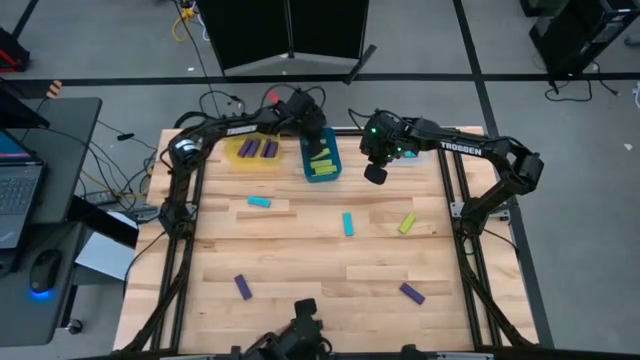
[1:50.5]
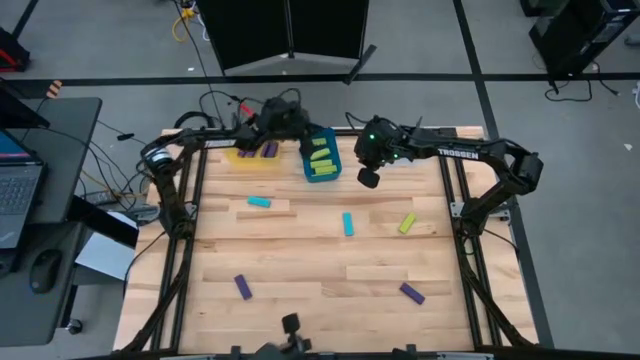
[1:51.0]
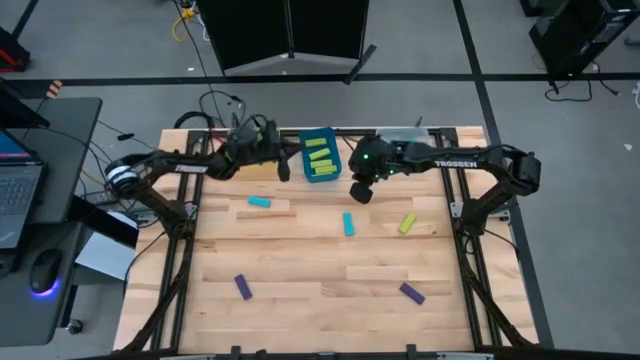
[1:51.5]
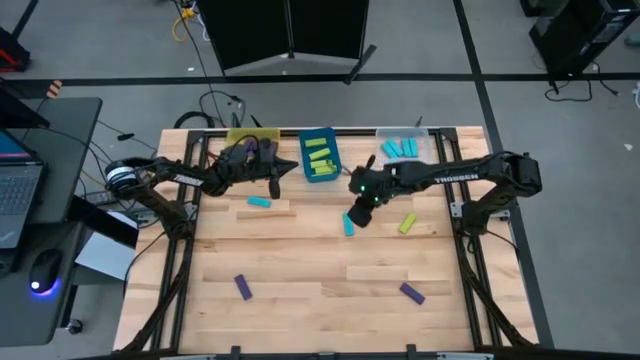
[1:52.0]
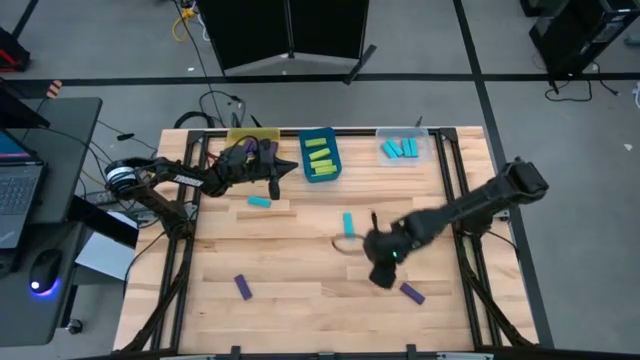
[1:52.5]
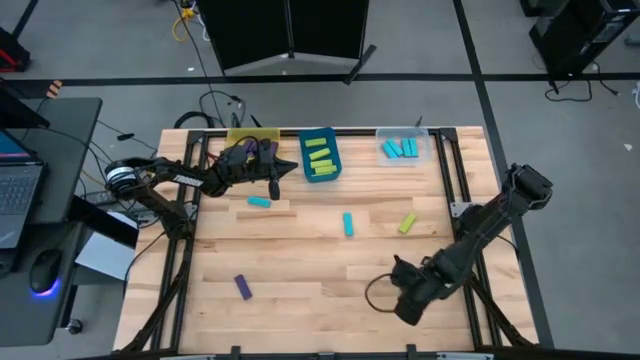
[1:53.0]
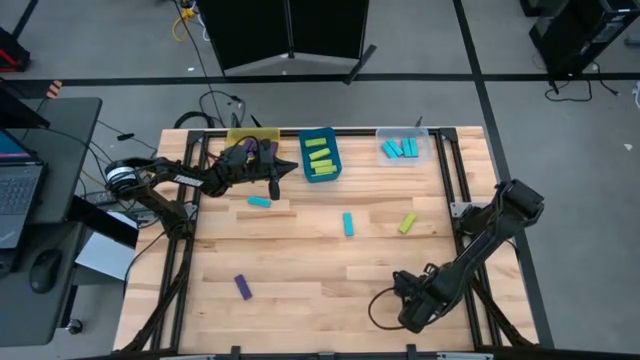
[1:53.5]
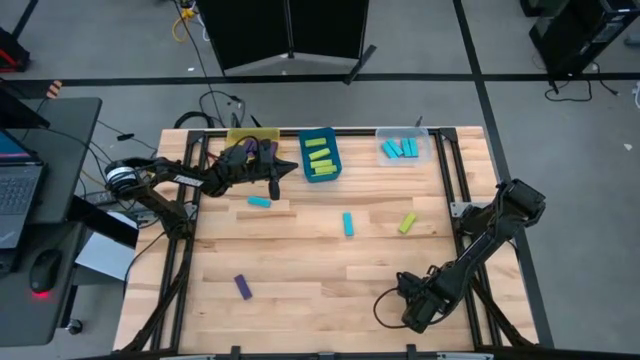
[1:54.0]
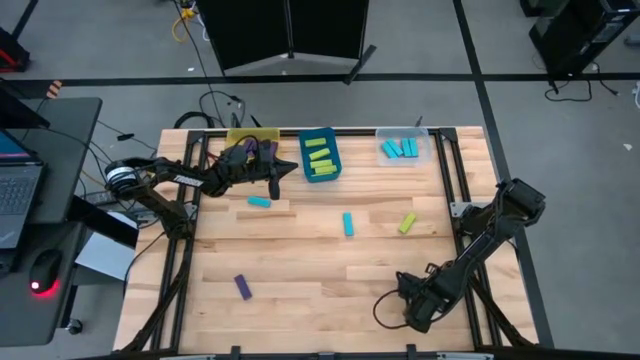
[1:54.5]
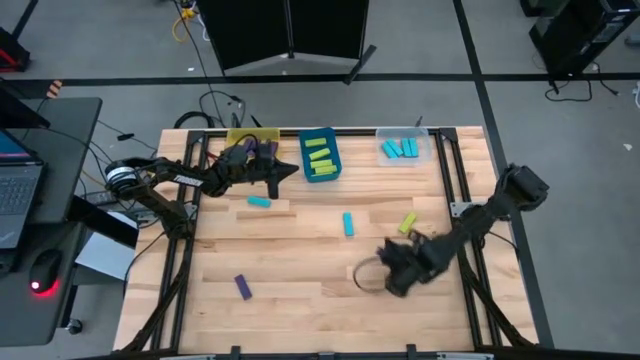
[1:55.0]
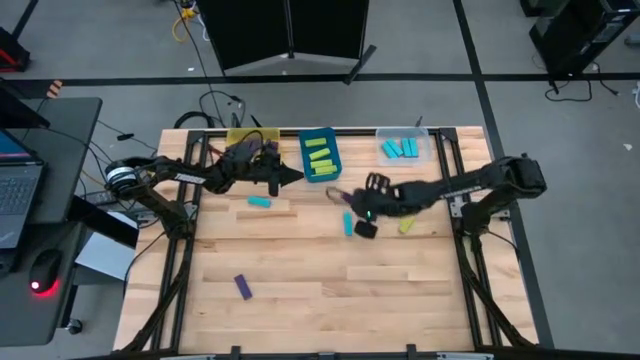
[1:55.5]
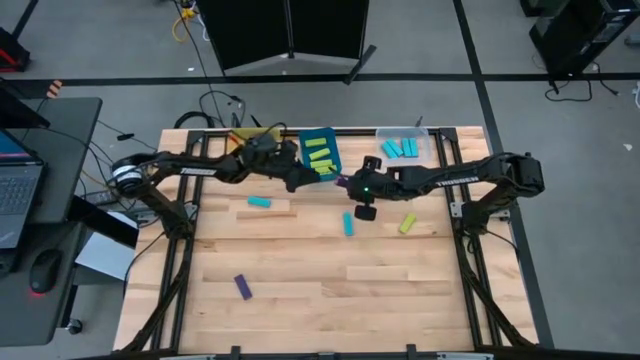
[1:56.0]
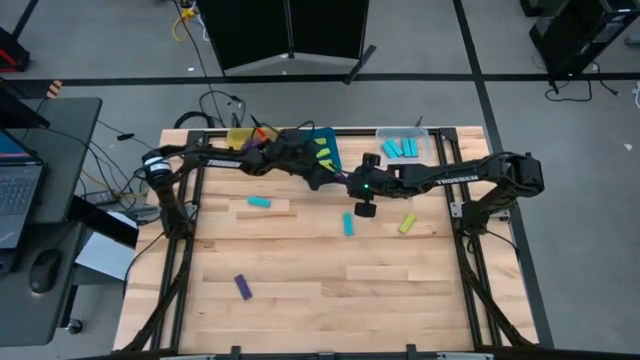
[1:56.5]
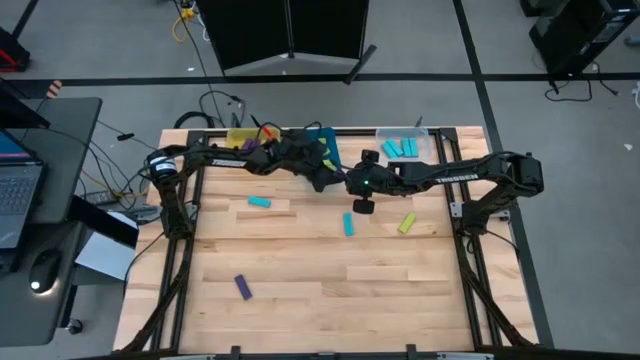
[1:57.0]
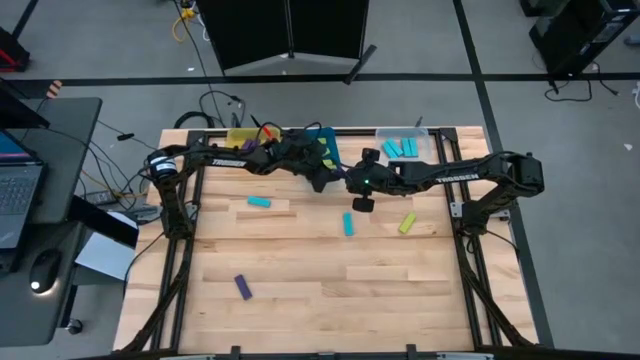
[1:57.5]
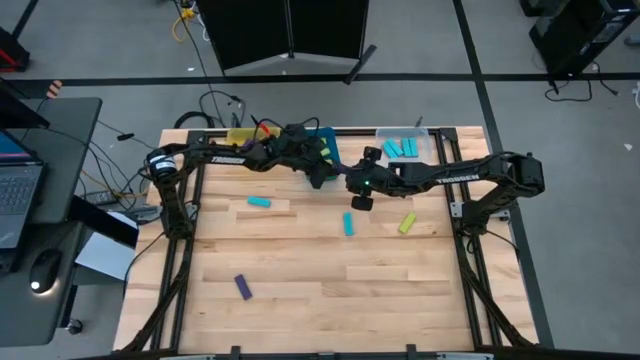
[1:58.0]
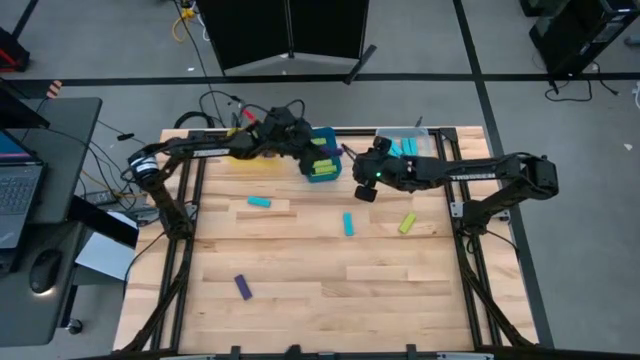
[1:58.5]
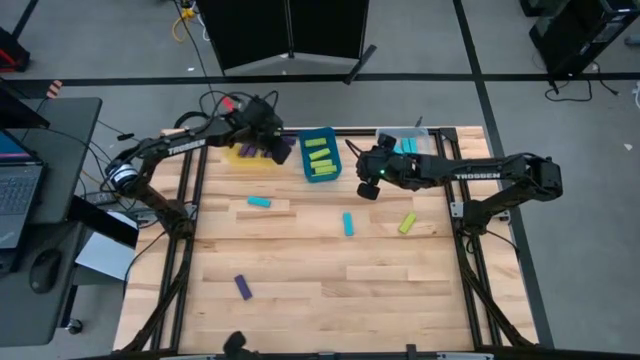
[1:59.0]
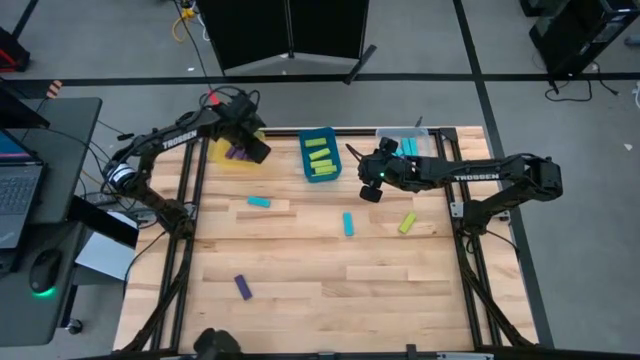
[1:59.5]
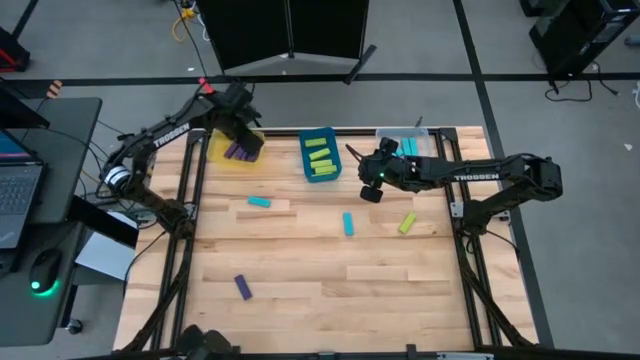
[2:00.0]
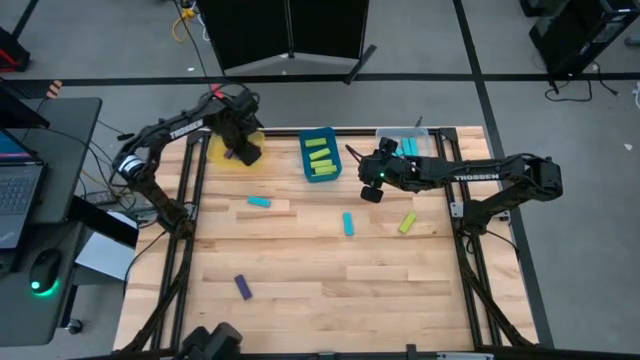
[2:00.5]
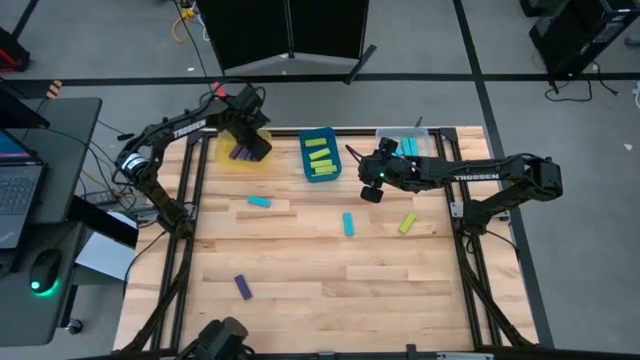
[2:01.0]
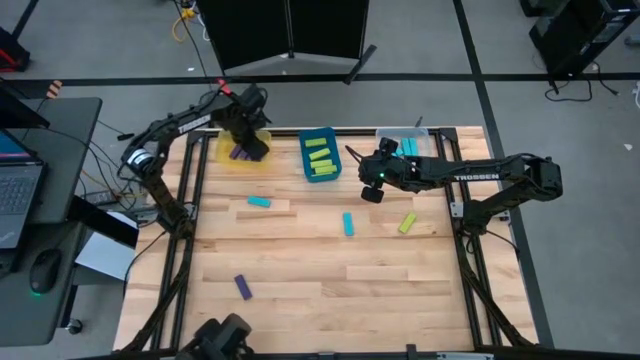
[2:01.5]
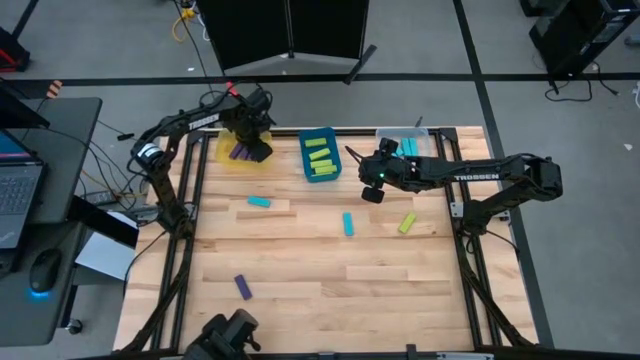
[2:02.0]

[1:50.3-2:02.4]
Task: Sort blocks
Put the violet block into the yellow bin

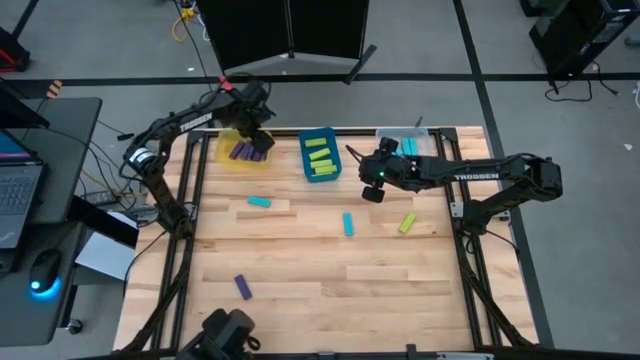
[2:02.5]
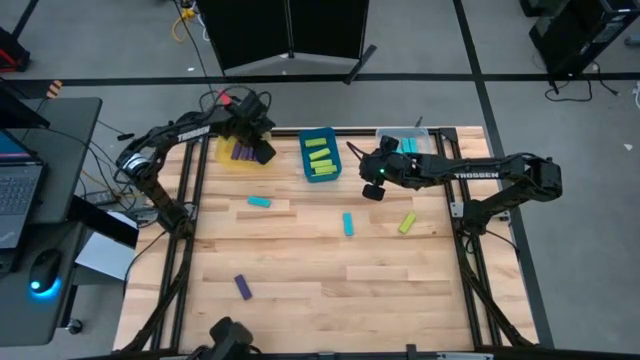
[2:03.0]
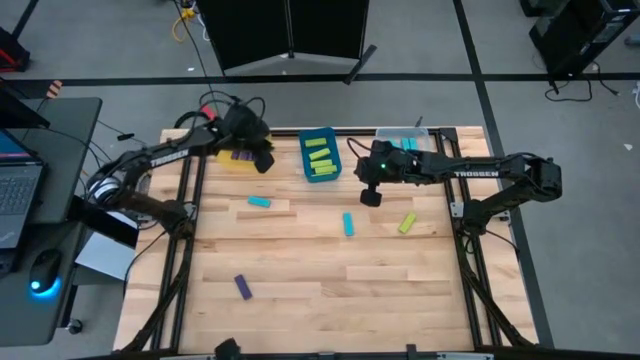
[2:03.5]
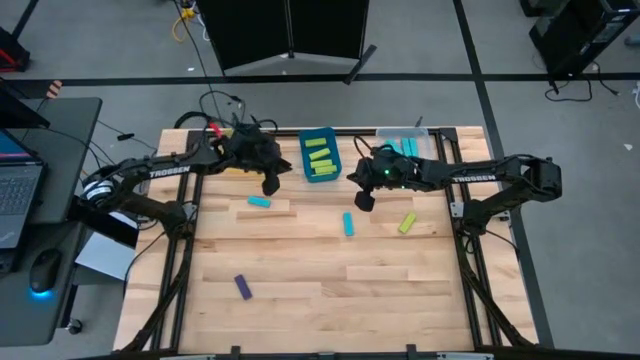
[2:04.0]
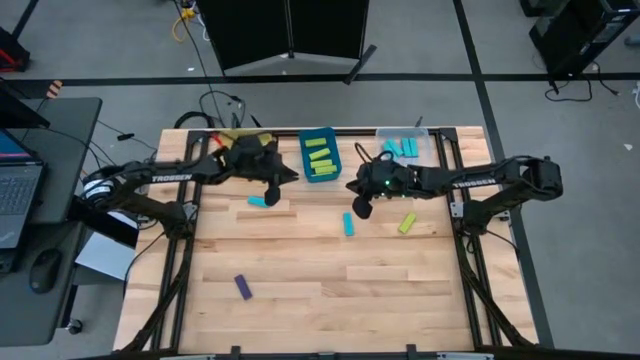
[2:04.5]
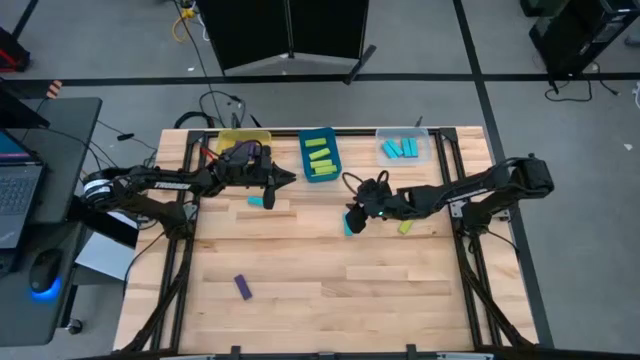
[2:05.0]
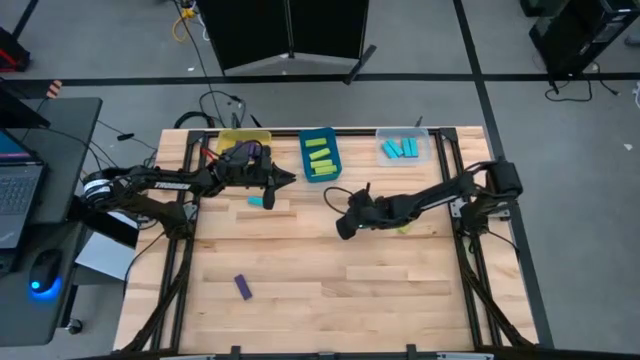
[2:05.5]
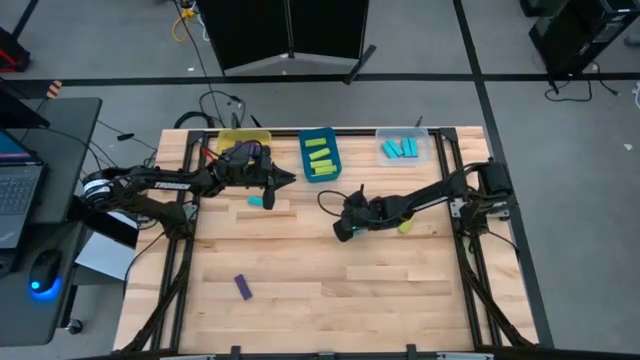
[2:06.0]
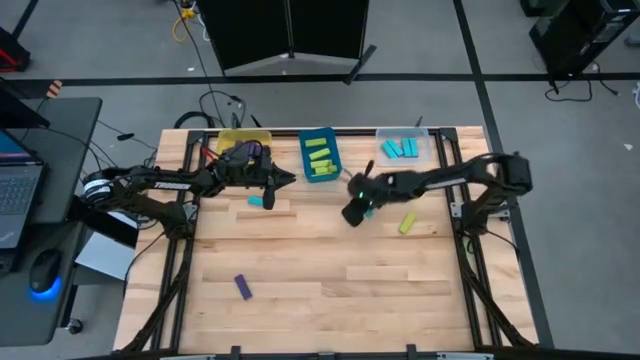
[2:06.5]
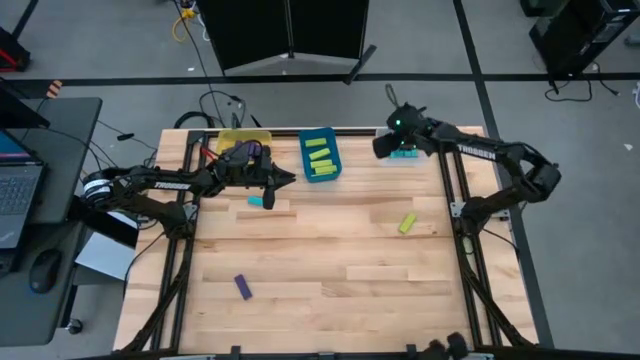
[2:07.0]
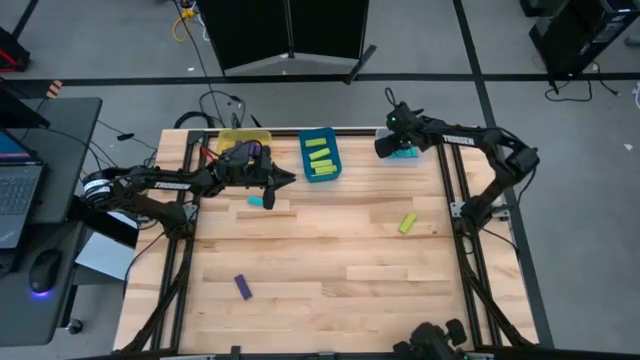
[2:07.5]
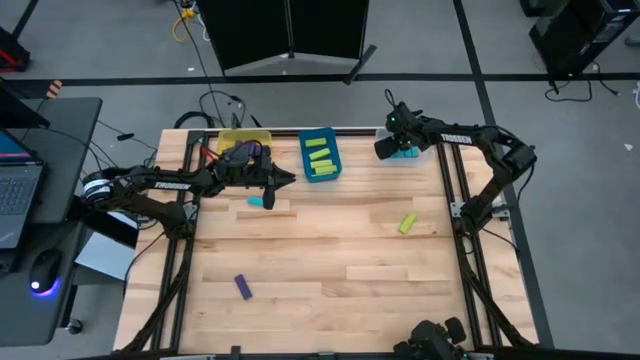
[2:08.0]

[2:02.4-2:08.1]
Put the blue block into the transparent bin

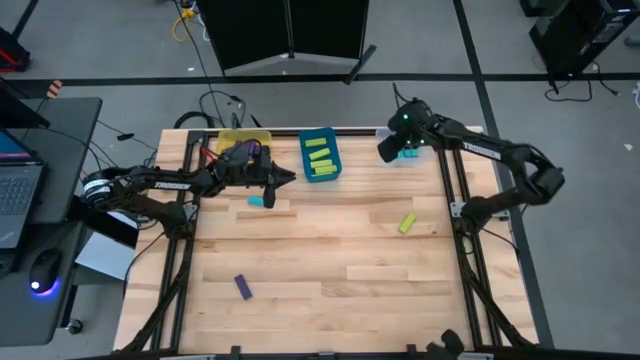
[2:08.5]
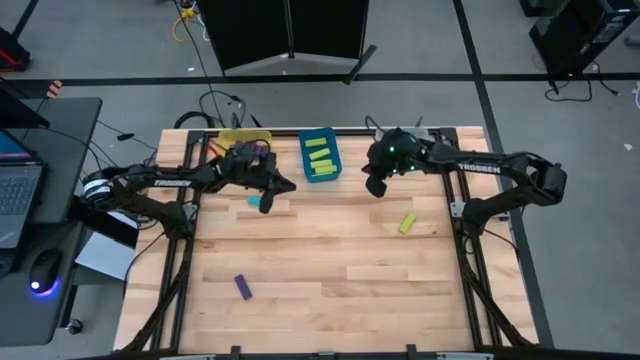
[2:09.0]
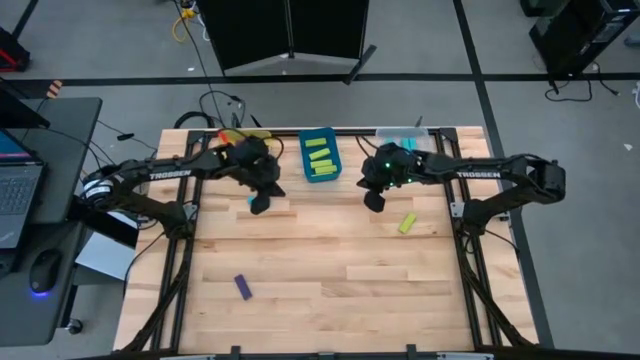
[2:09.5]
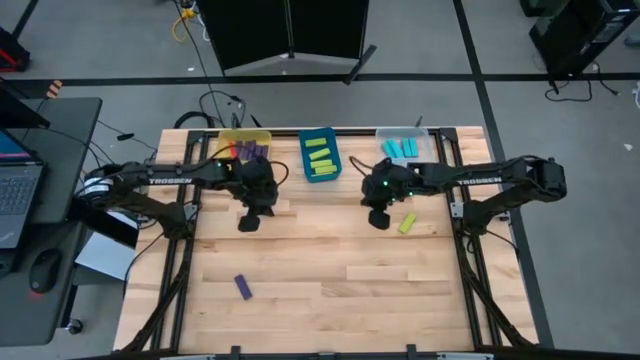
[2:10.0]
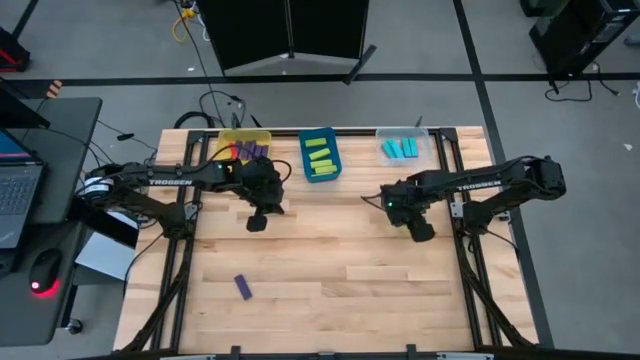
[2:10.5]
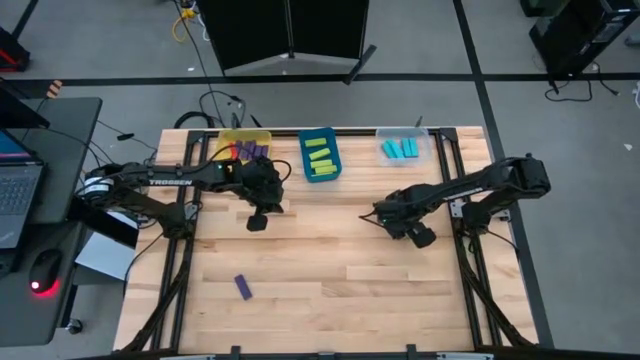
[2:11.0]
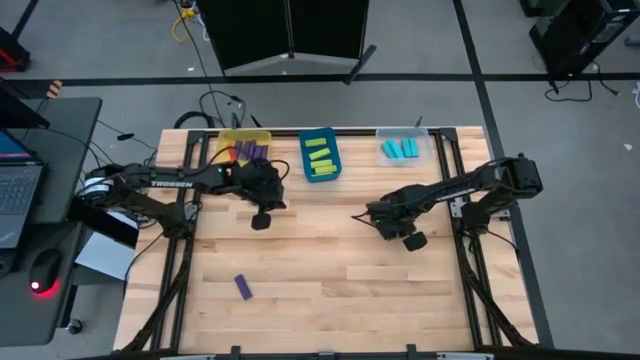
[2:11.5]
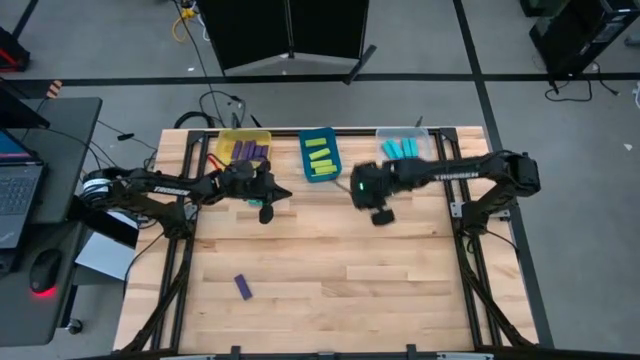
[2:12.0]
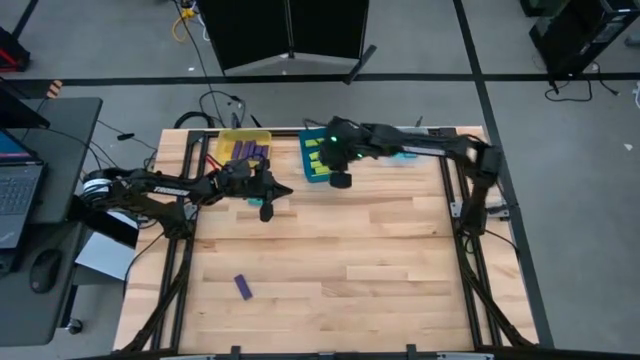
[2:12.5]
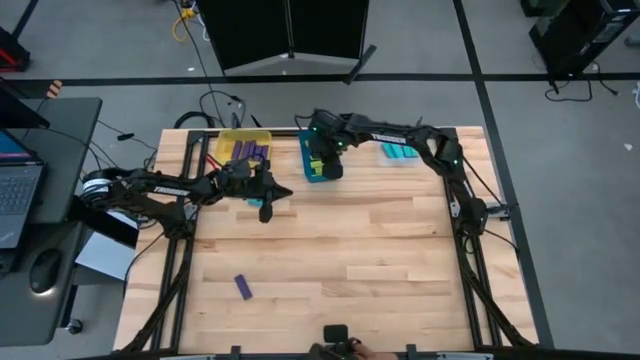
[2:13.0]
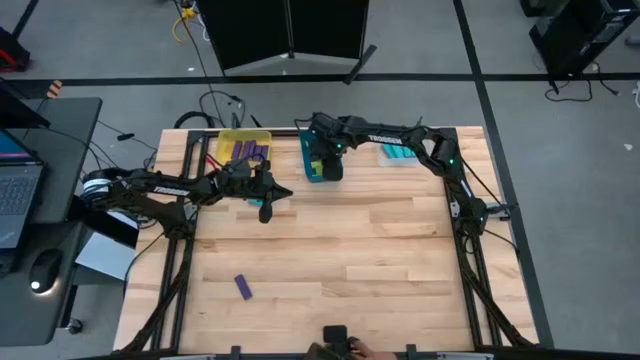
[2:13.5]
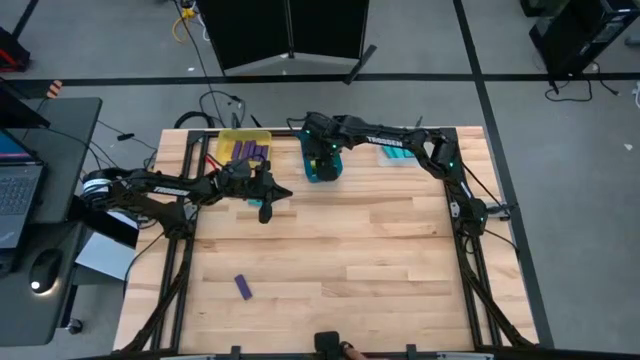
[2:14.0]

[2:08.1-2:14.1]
Put the green block into the blue bin
